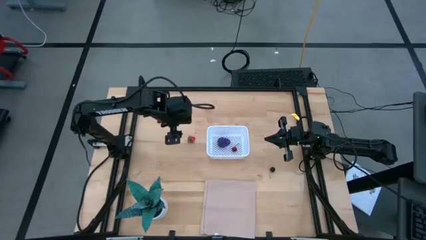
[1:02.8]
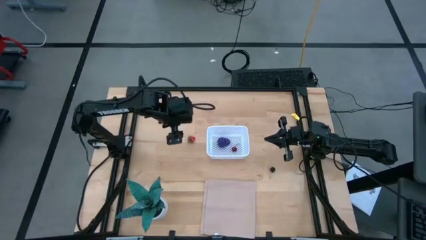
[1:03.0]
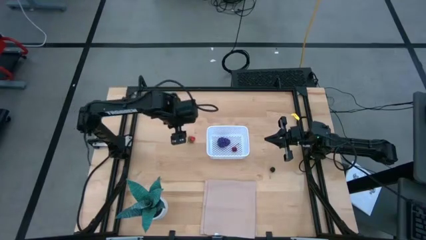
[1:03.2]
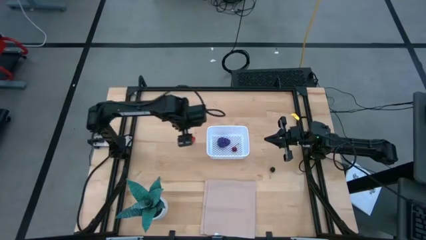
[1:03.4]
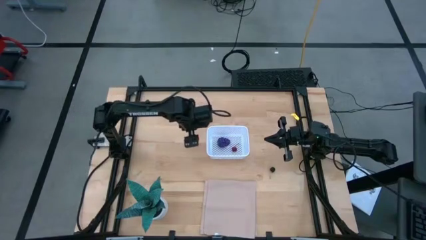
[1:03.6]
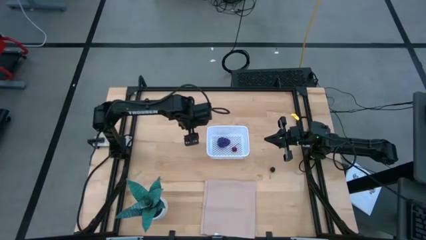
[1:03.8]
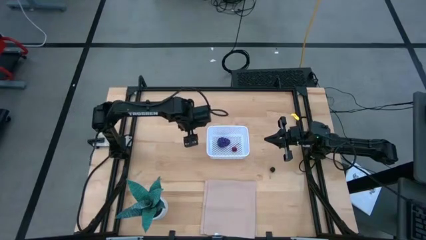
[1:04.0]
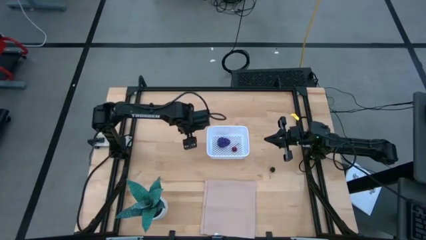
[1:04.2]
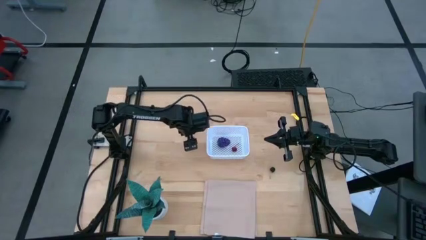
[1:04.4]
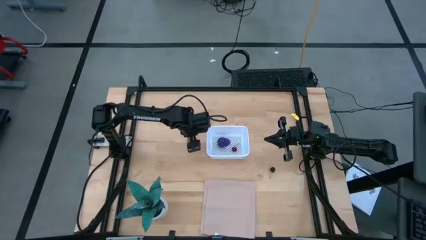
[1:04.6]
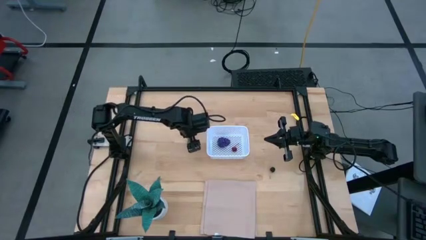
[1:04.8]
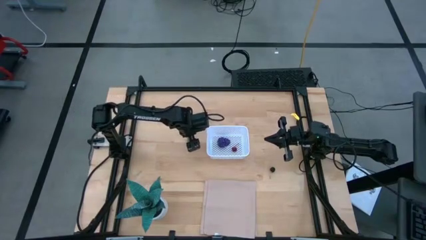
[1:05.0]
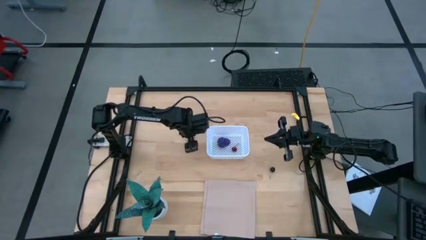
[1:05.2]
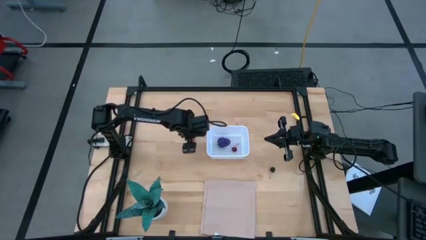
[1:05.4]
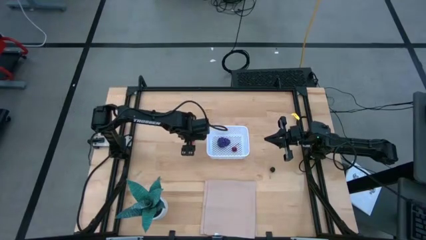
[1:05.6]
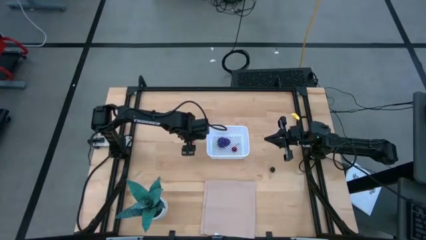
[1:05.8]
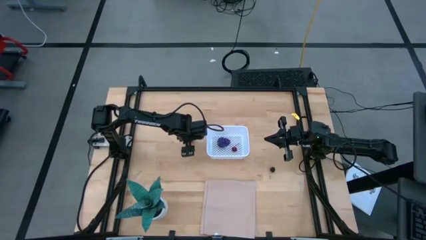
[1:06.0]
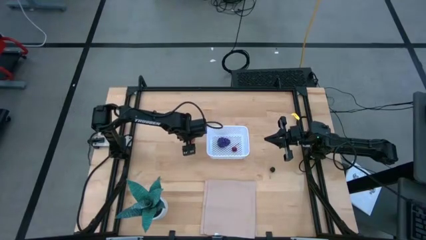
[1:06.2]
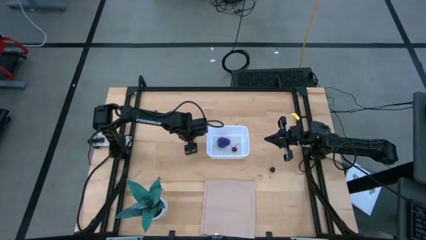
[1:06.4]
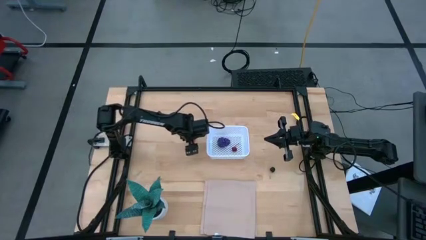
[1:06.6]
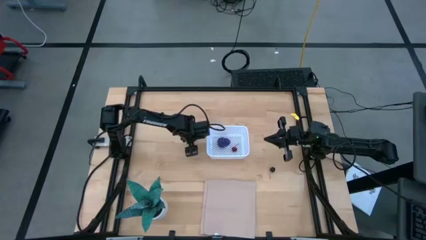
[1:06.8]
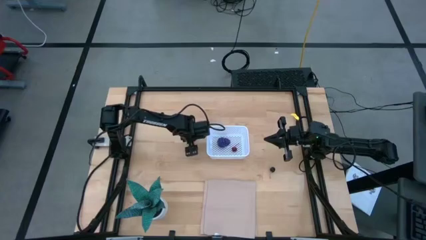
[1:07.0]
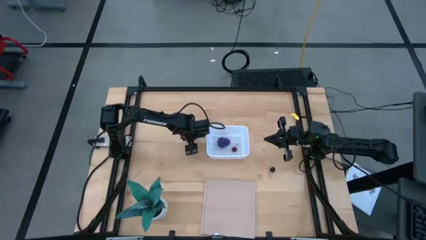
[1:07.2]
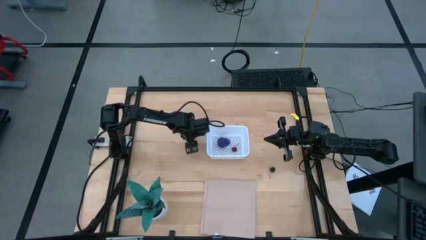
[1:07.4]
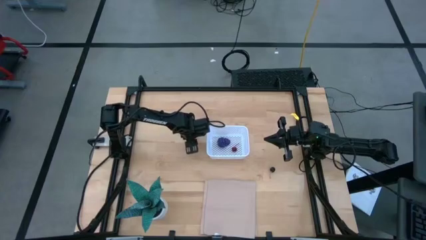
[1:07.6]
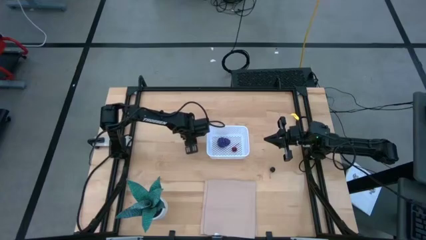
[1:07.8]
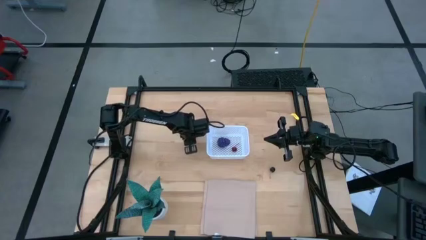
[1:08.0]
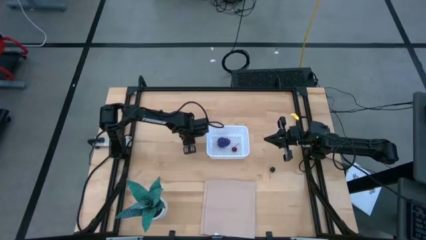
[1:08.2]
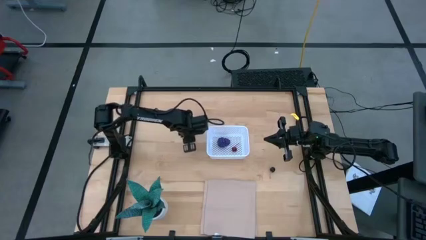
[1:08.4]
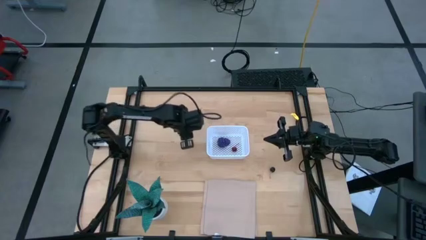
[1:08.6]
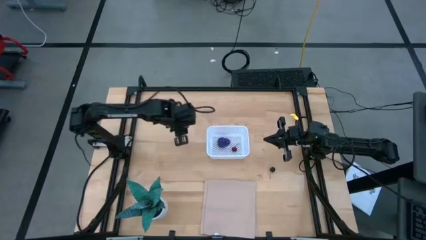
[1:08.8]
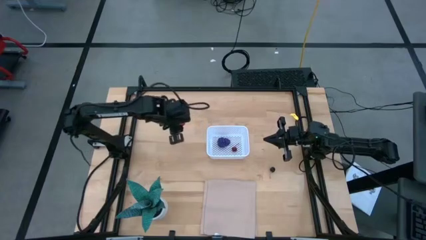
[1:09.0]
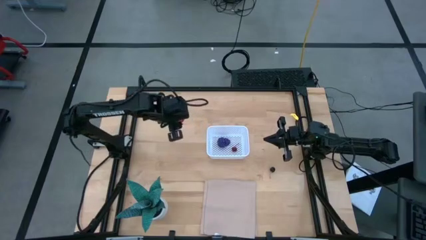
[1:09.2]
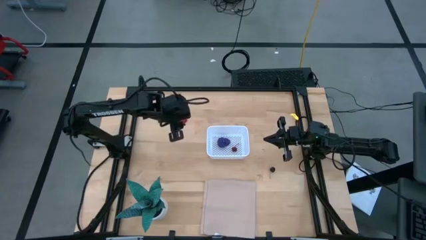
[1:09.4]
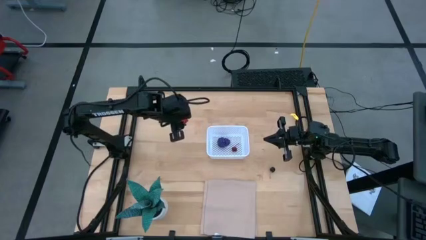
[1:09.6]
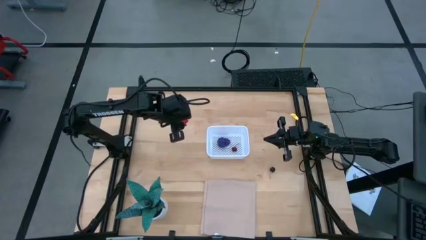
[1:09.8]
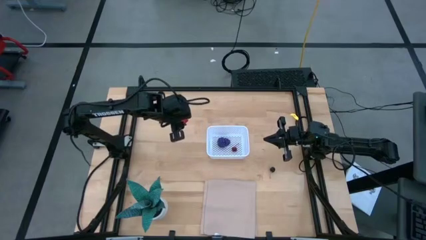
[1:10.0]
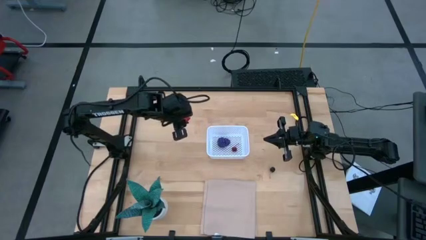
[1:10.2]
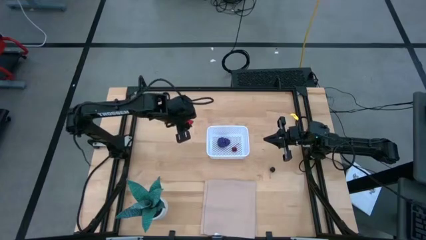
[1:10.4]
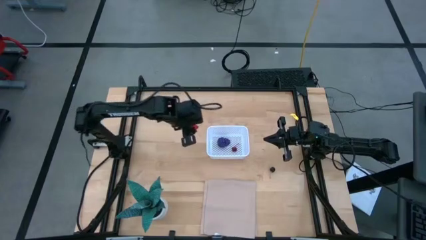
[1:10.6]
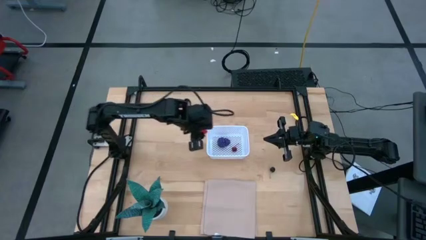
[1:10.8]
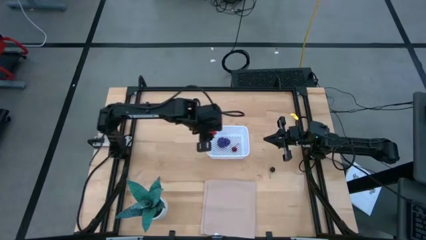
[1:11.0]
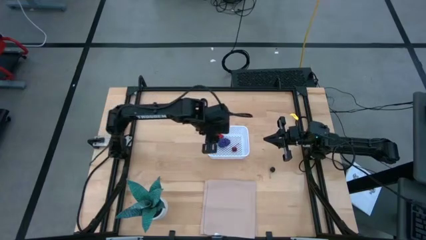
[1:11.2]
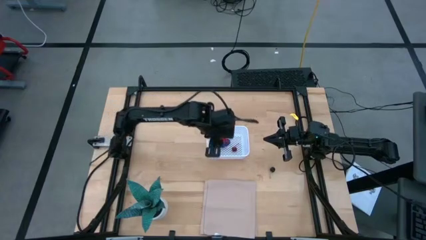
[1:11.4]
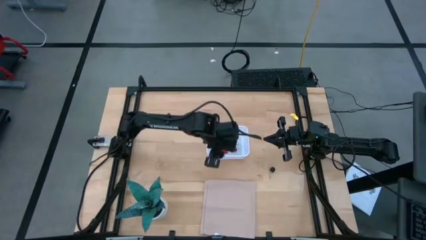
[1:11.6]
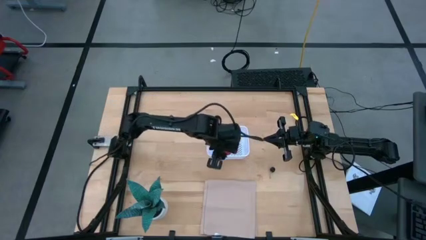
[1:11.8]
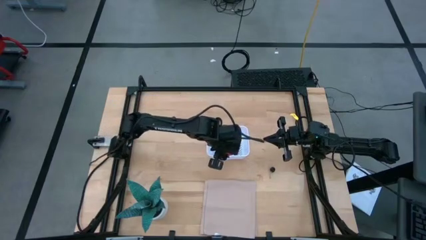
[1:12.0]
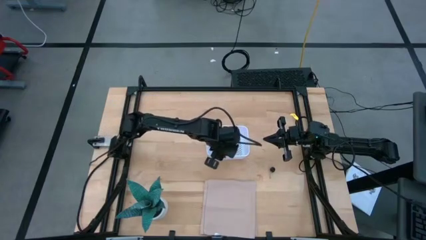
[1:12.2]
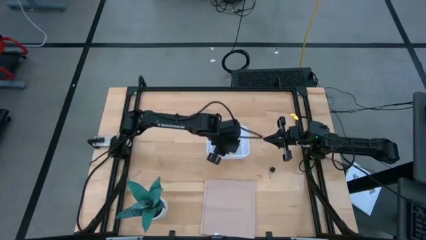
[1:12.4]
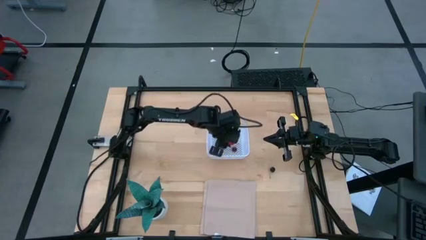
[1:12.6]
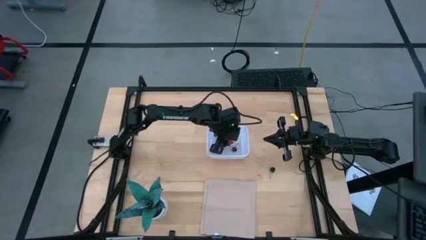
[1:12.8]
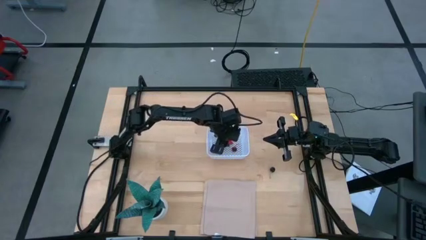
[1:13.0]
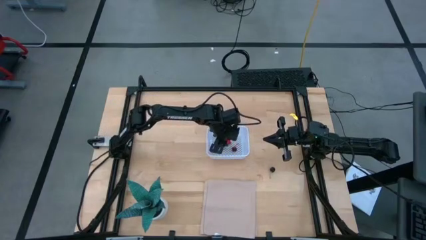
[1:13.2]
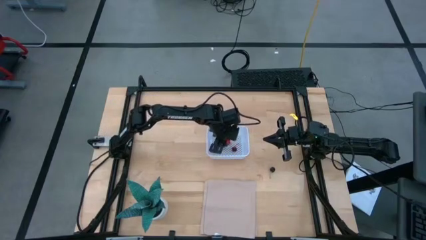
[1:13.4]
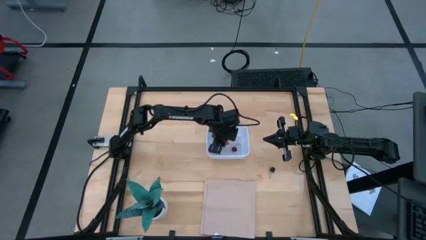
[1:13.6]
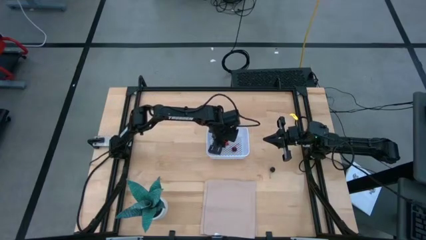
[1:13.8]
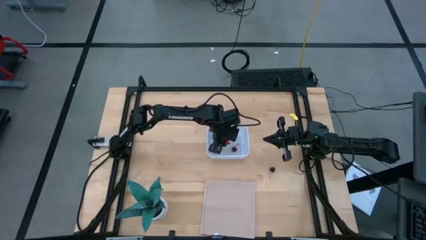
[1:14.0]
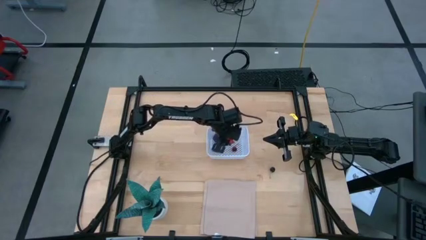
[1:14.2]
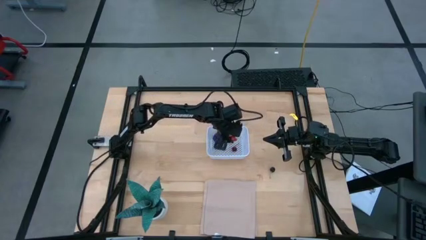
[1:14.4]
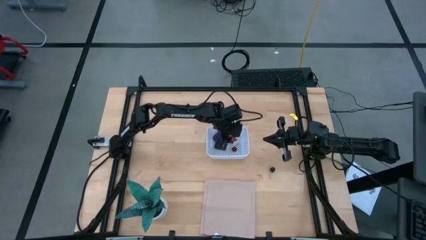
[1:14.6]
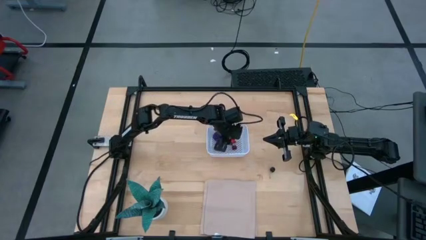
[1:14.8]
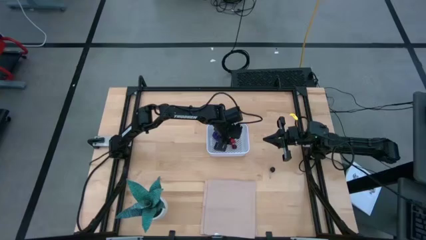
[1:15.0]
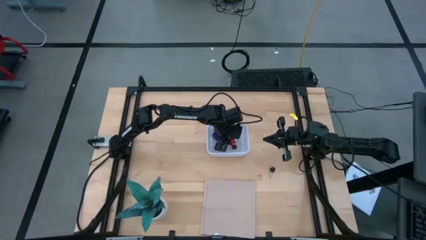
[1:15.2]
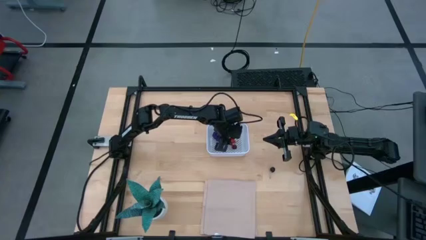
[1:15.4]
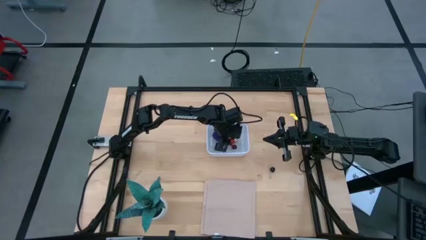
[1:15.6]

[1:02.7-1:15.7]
Task: Pick and placing Produce into tupperware
Put the strawberry into the white bin
